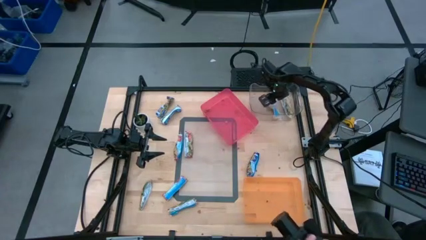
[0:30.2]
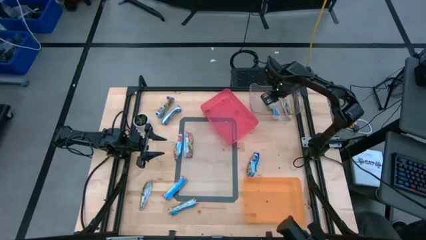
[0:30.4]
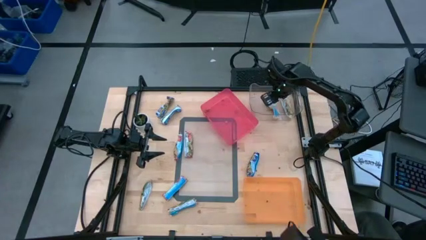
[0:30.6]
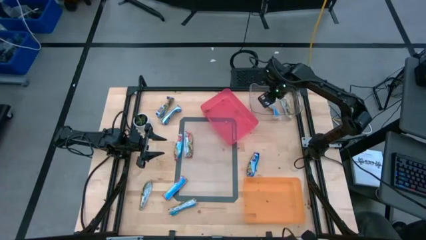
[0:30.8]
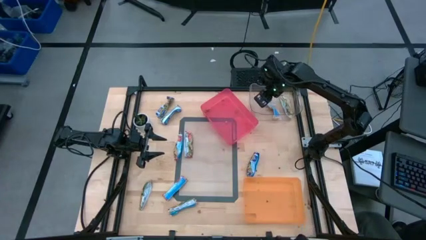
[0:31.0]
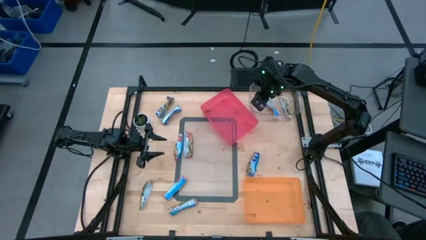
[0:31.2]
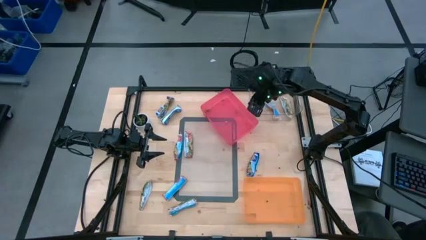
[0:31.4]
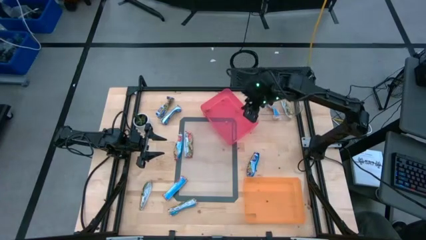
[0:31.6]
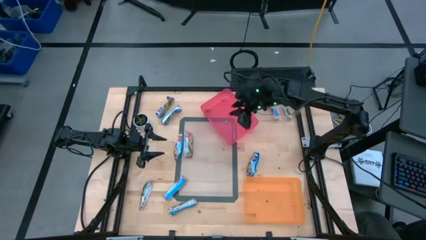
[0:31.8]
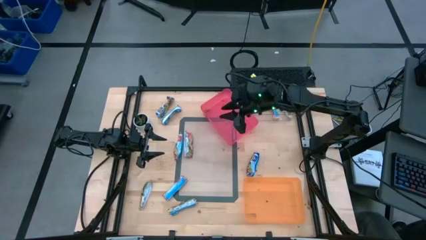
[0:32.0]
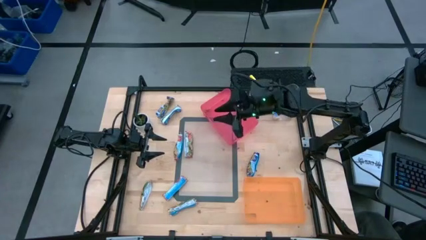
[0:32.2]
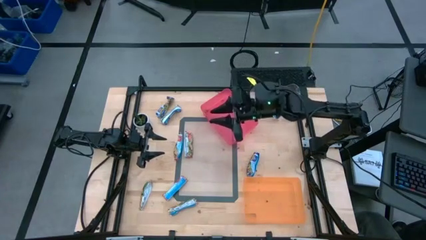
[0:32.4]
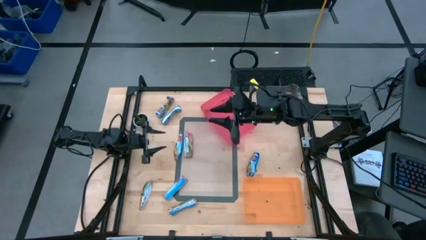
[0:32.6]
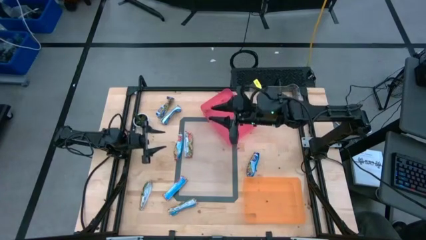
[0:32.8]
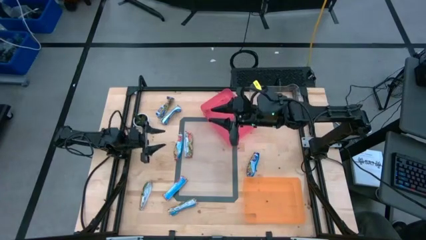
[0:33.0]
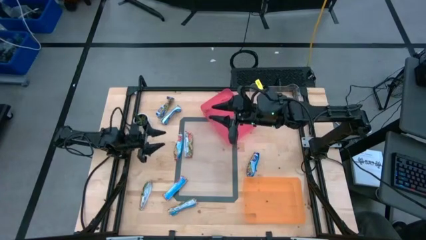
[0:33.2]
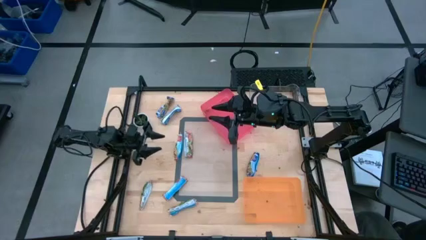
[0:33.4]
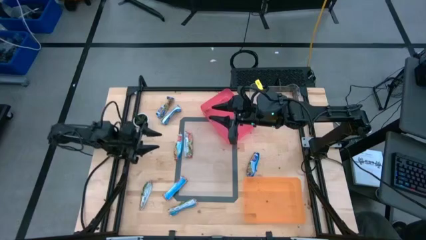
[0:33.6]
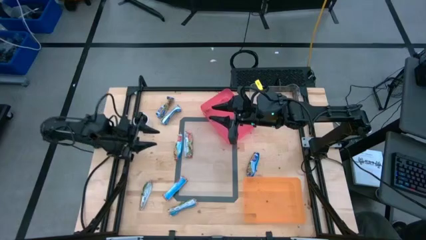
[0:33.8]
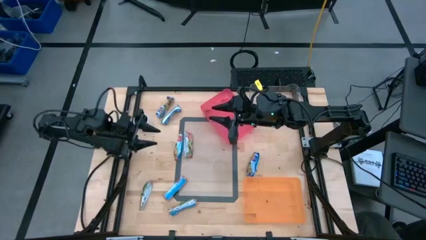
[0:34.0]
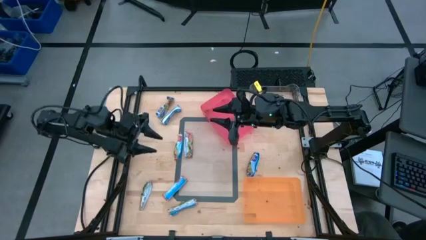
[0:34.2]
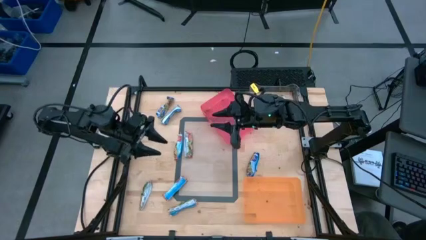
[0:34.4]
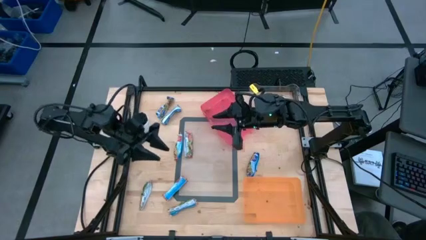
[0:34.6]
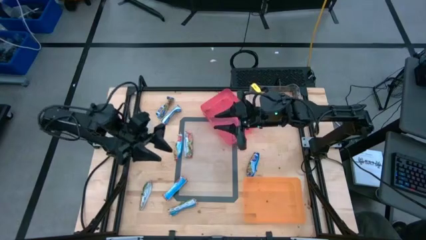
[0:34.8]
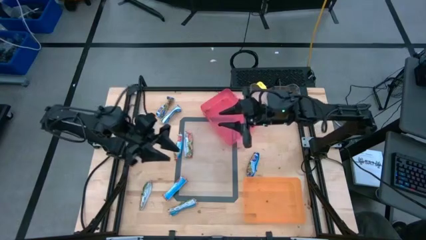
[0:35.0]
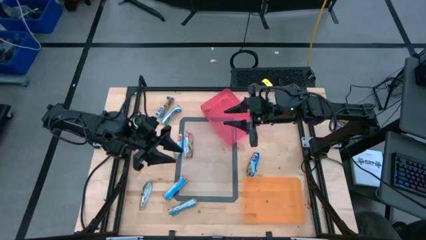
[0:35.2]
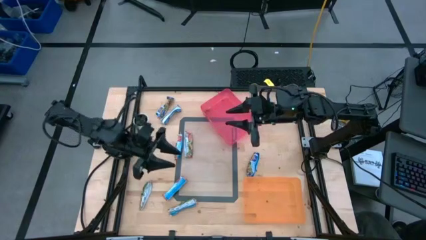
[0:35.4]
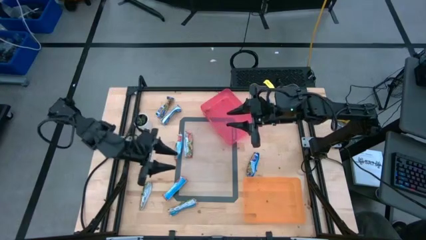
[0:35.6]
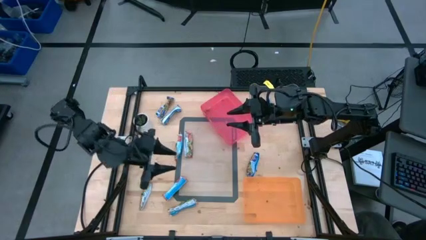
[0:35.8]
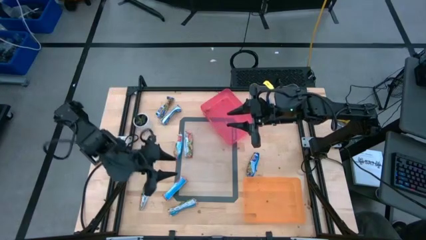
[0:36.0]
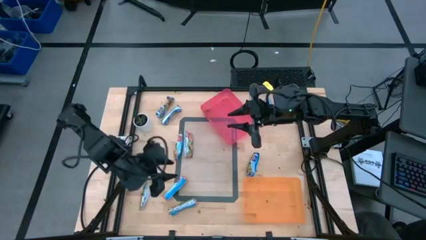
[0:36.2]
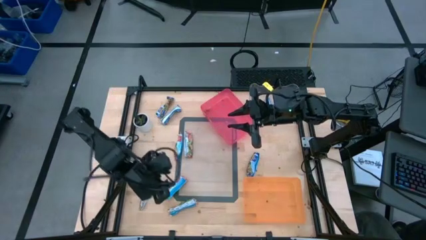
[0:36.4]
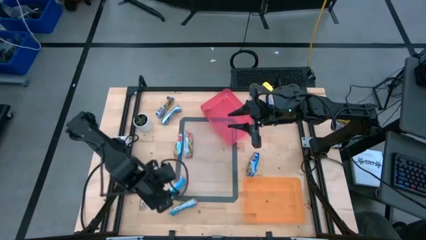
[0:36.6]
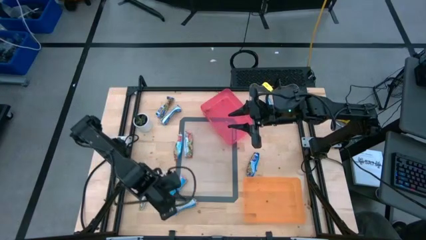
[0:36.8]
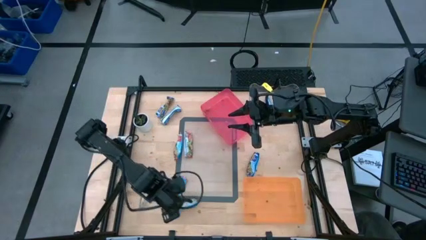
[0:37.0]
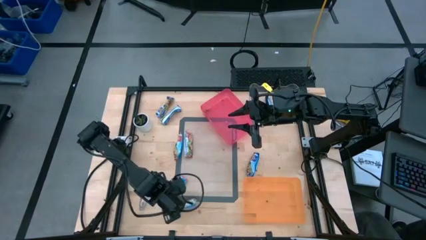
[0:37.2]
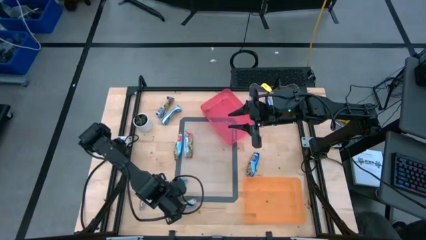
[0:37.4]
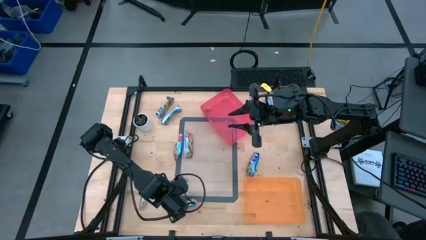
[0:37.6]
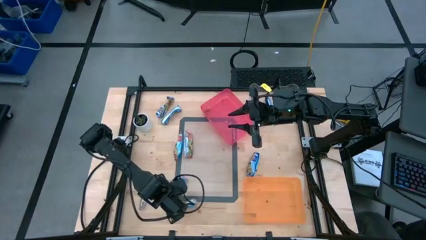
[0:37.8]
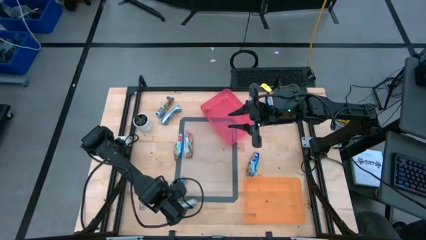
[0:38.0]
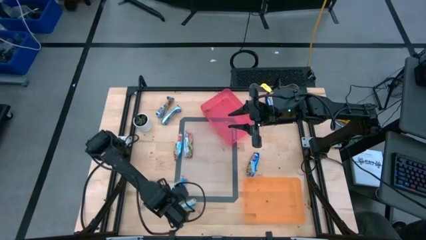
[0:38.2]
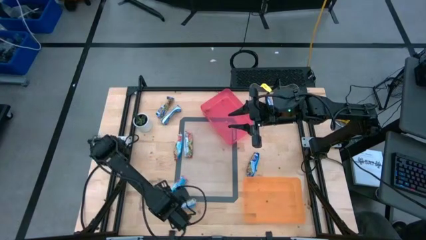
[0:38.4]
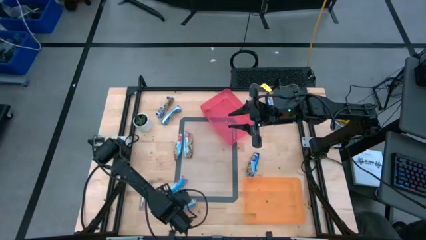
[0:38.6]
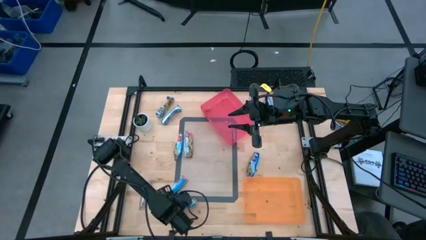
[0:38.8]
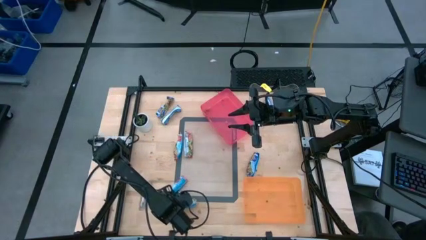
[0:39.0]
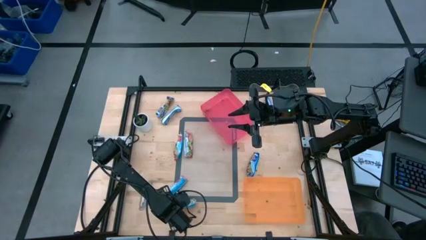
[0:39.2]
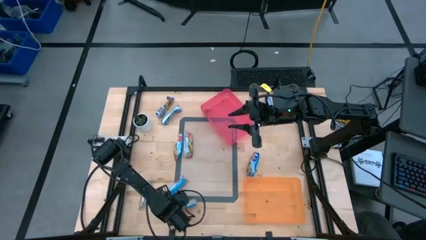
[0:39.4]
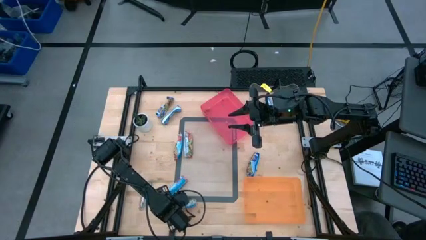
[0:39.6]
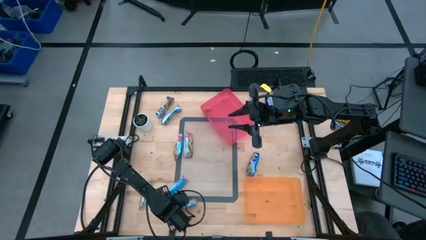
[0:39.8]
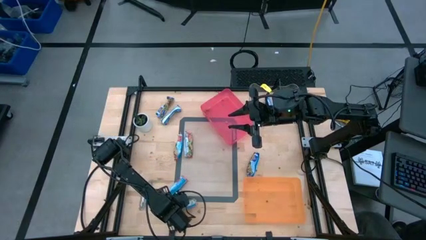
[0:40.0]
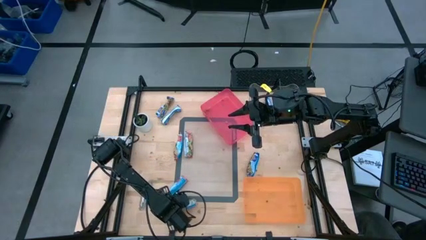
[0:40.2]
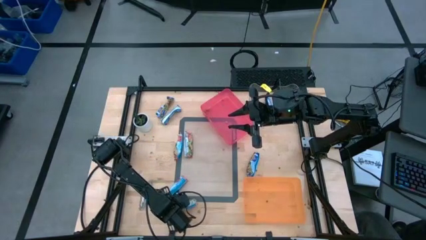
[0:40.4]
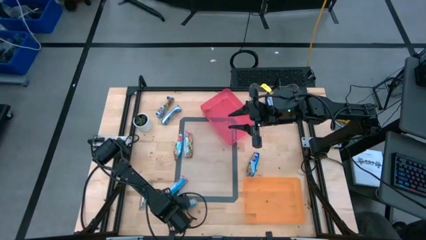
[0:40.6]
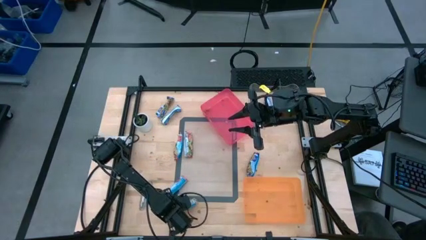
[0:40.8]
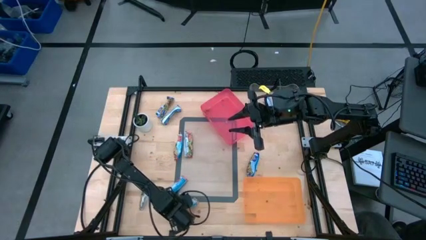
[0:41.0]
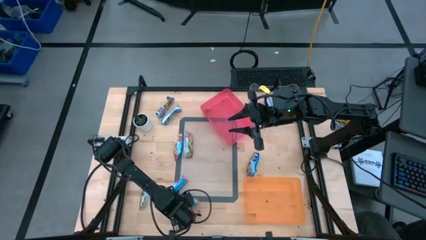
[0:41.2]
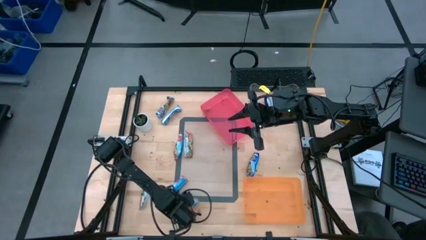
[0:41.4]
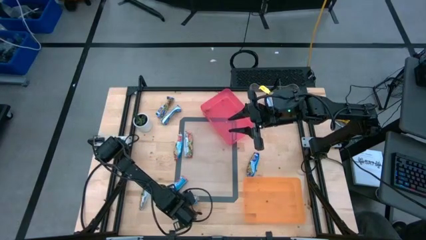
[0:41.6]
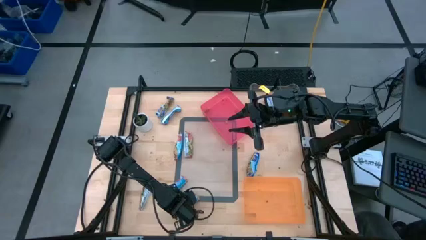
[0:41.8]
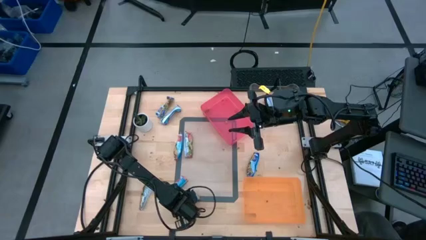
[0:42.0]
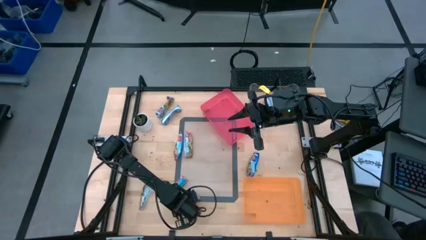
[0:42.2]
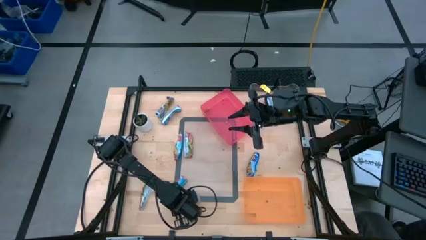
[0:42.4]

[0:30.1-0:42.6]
Task: Pick and place Granola Bars by type
Put the yellow granola bar into the transparent bin
